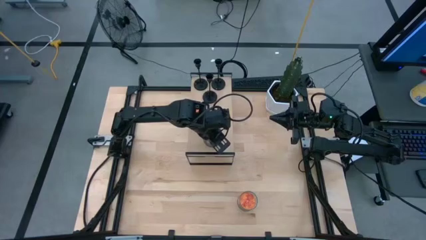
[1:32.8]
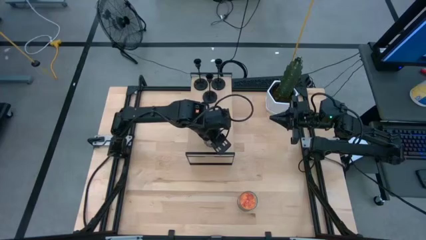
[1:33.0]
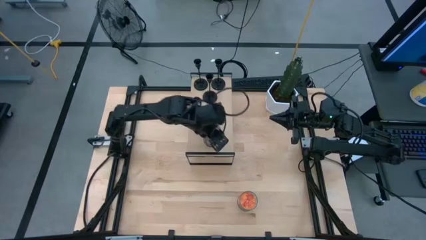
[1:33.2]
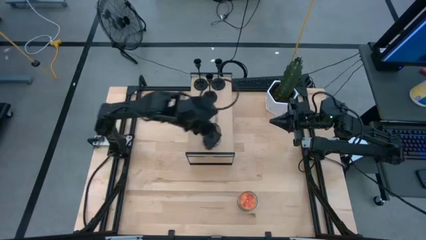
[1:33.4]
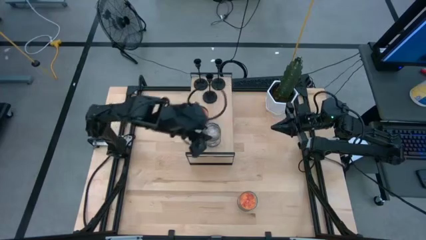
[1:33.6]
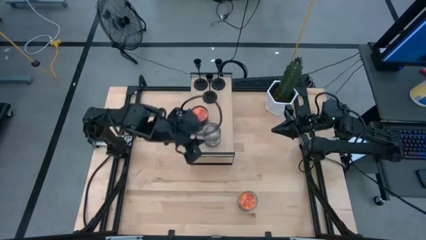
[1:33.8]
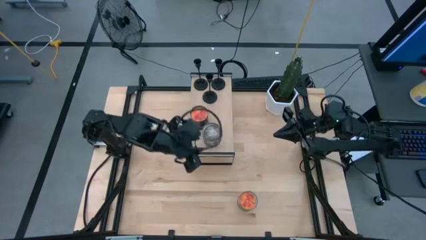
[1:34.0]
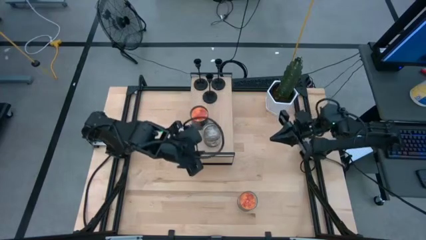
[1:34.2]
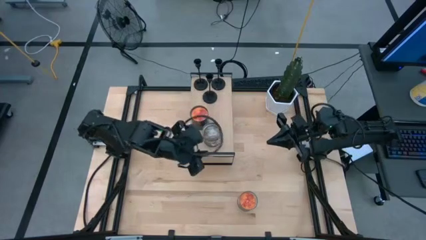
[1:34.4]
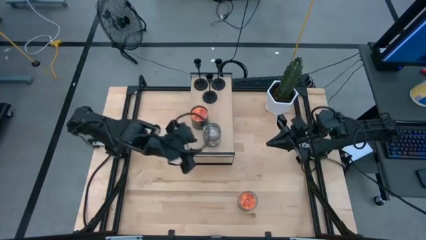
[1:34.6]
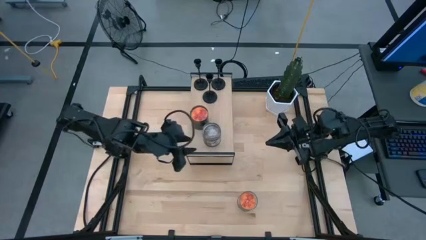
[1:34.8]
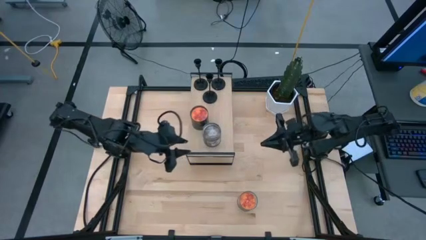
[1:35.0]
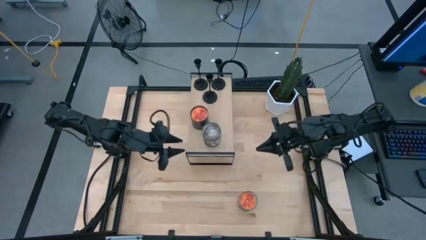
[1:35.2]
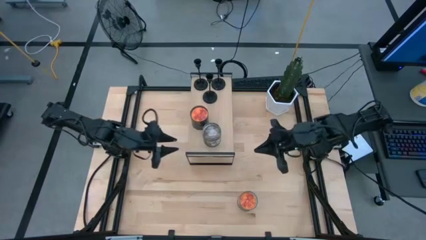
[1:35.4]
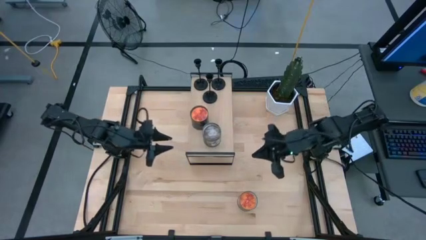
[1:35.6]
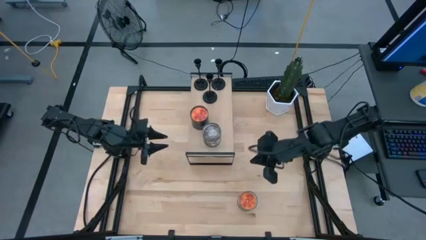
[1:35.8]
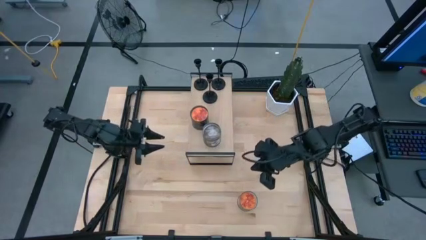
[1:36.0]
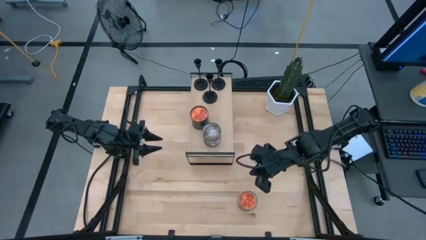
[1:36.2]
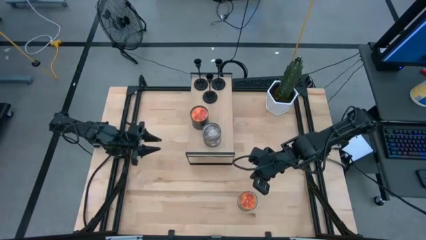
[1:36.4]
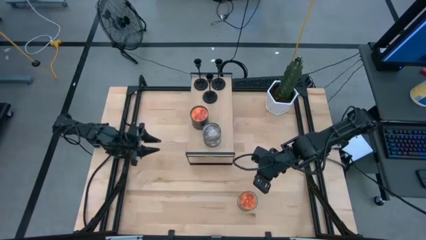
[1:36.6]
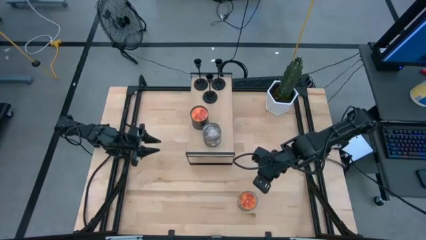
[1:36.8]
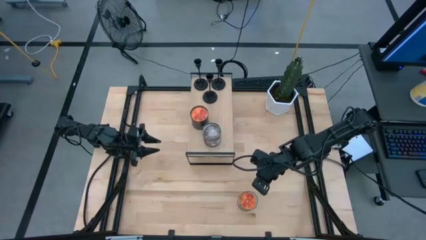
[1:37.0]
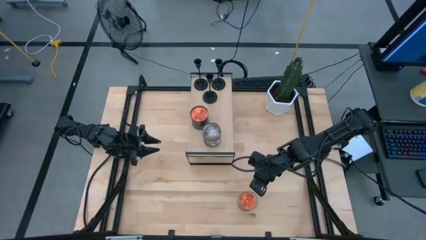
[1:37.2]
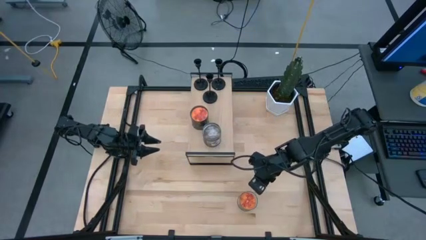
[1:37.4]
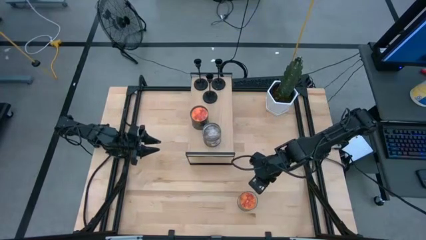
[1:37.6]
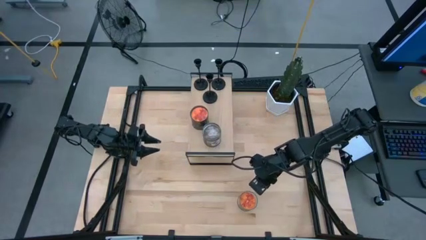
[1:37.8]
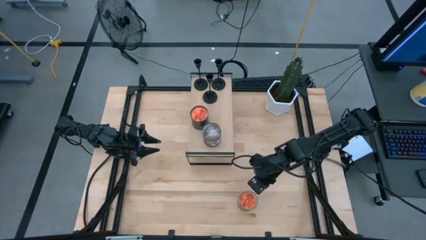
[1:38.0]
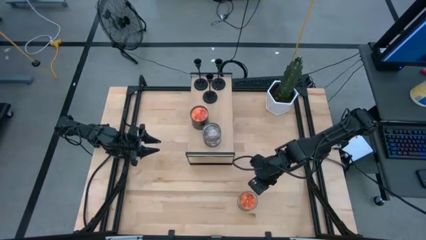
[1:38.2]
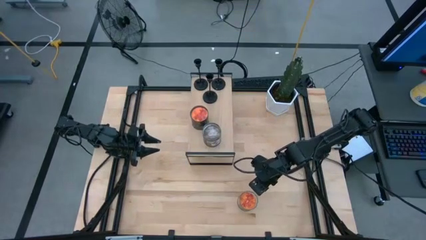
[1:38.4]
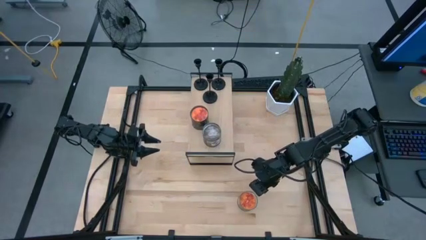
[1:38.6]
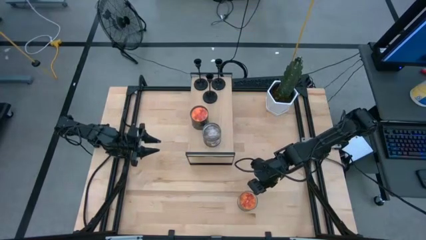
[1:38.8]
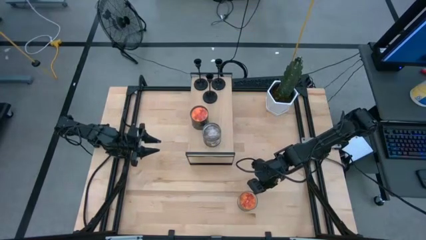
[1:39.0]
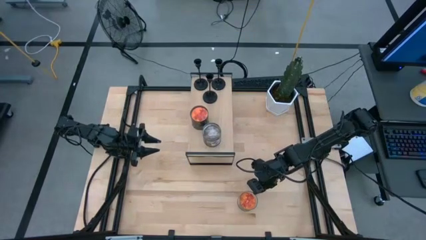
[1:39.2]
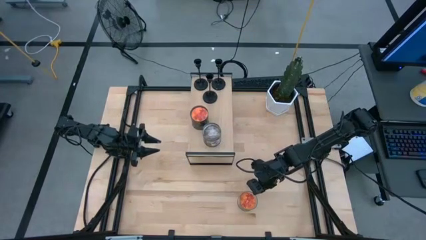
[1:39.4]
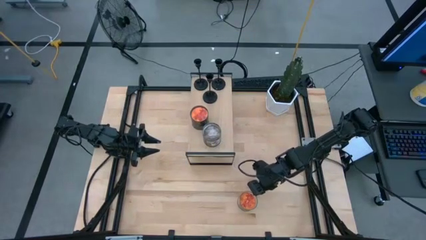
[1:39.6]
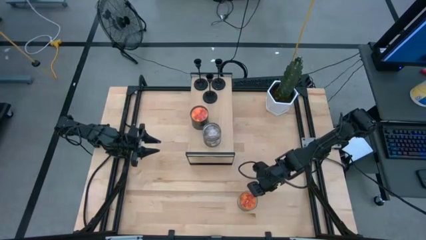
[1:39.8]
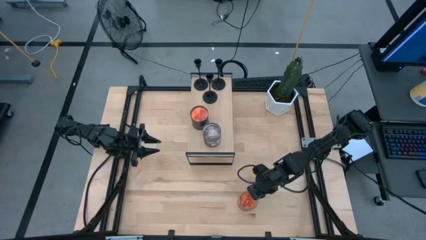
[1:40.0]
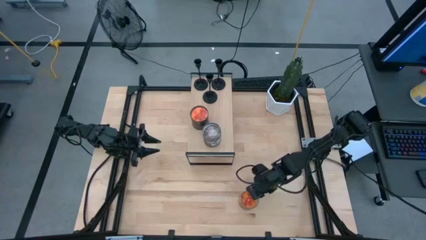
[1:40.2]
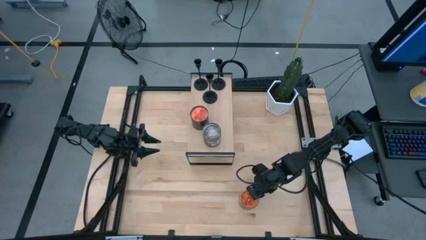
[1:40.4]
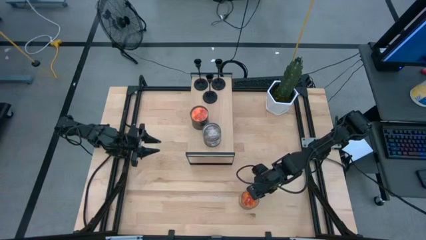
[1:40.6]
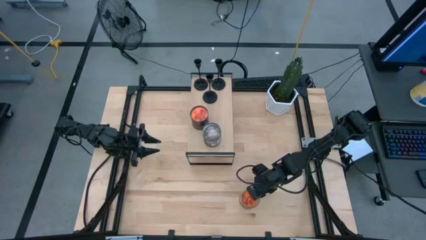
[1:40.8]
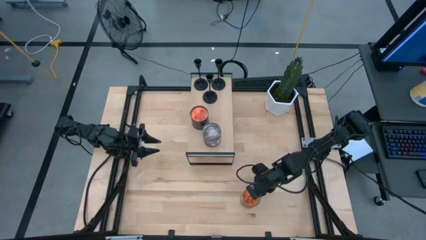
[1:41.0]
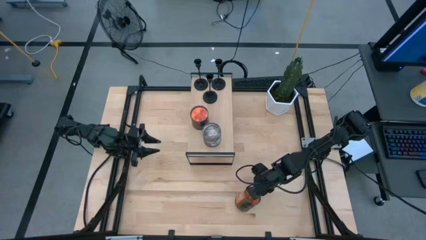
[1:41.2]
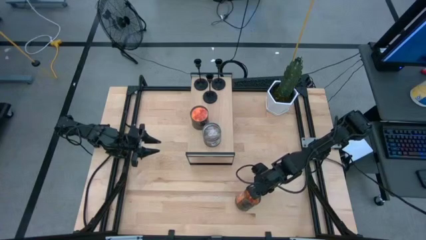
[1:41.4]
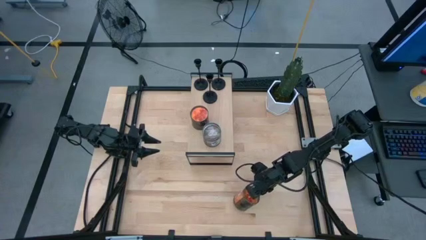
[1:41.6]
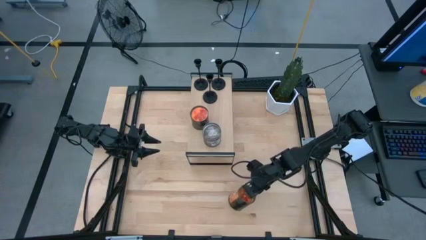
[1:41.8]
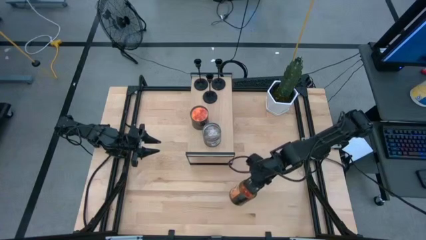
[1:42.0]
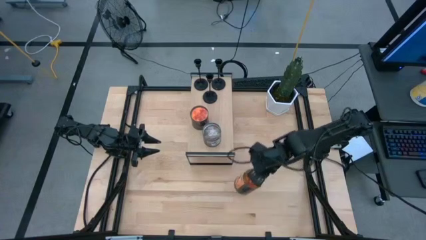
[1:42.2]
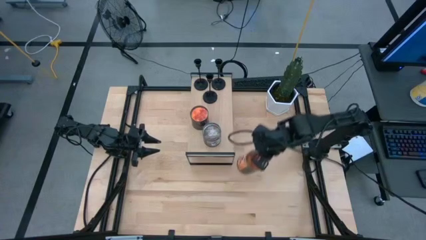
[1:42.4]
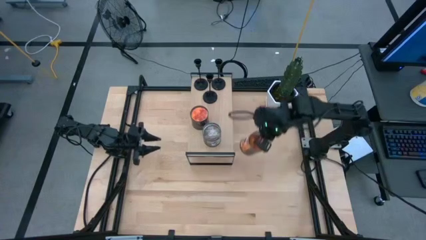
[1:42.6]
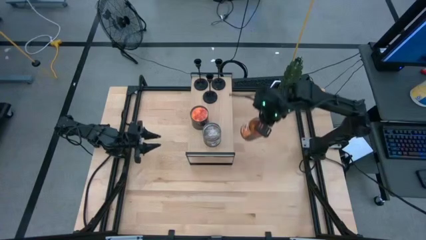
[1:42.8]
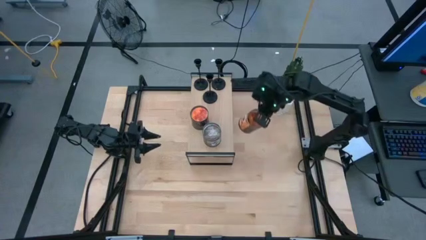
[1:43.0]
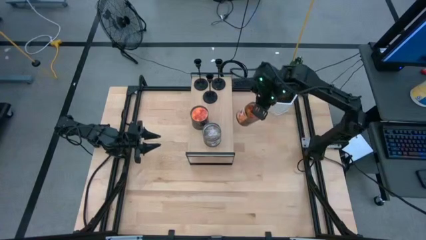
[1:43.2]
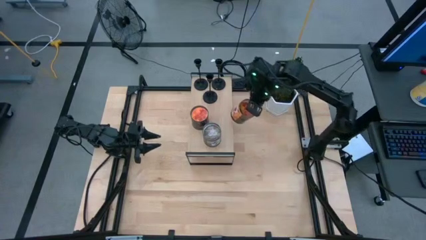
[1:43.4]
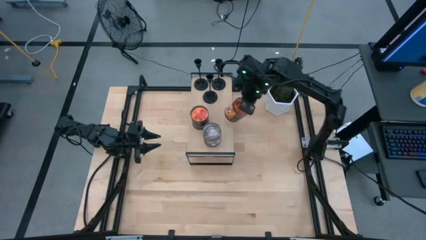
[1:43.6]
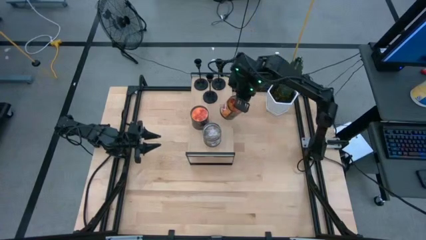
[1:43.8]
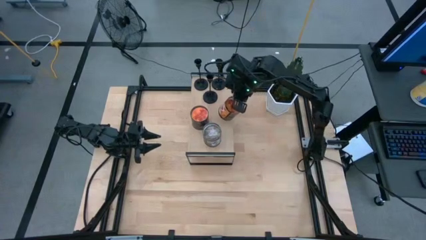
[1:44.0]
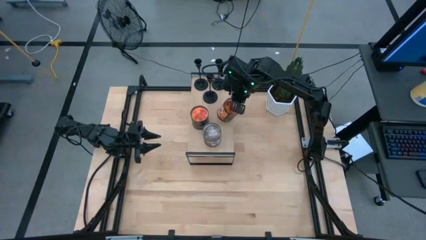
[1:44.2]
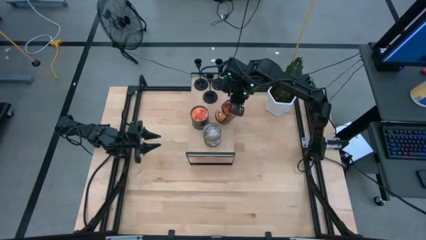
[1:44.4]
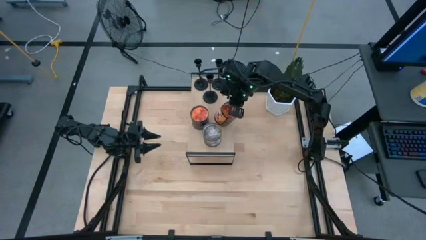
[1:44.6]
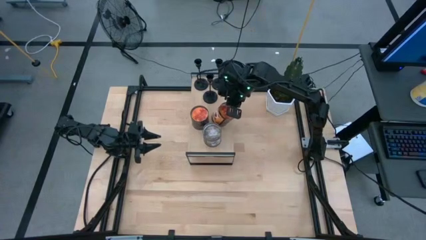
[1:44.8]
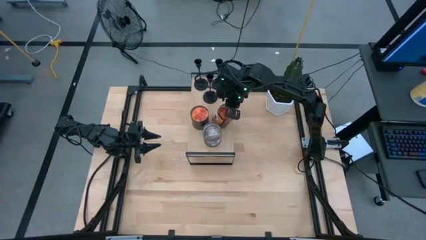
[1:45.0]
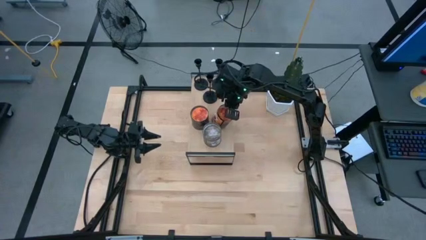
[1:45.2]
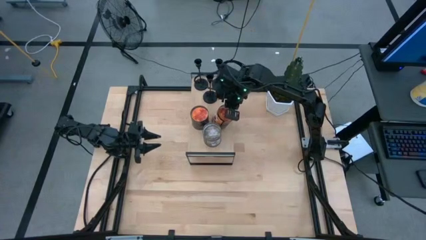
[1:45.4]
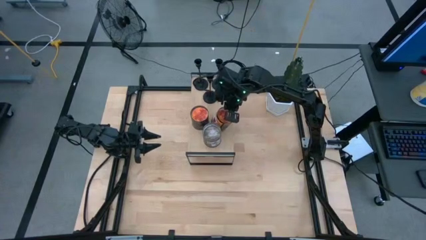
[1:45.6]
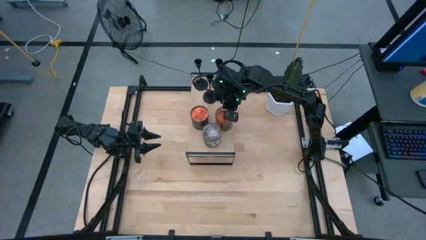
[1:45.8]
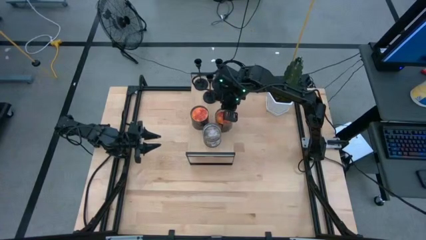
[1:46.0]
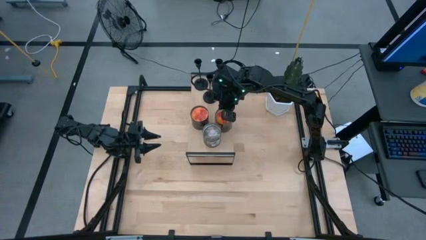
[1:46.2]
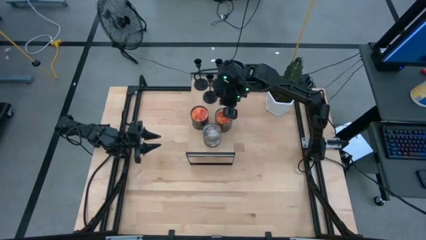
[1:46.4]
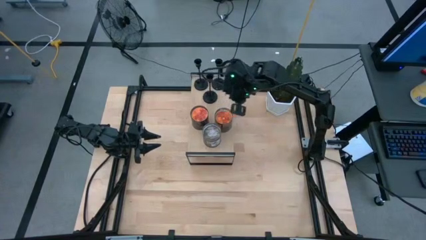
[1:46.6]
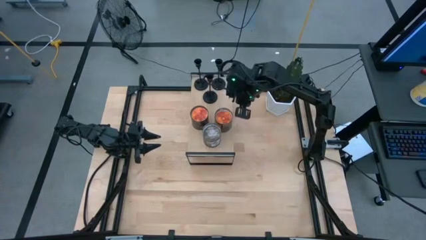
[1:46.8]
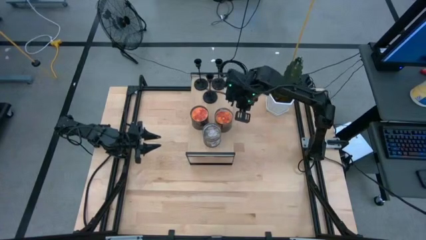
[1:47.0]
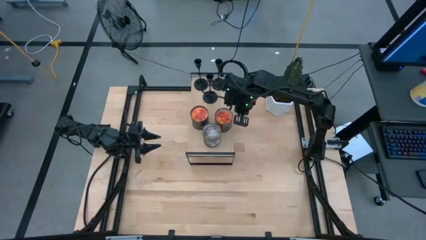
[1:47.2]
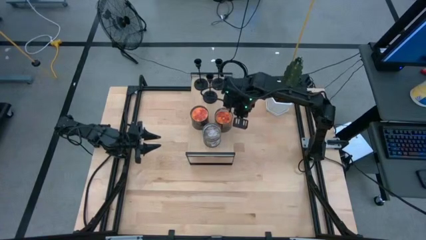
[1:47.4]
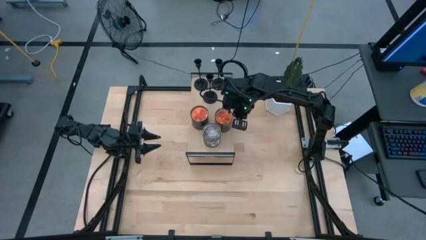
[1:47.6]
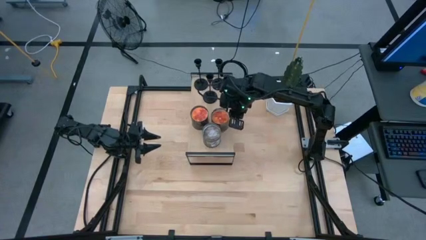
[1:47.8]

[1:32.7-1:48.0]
Task: Pick & Place candle stick holders
Put the orange scented candle on the shelf

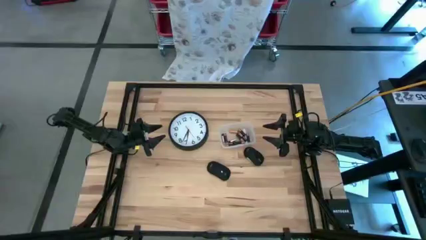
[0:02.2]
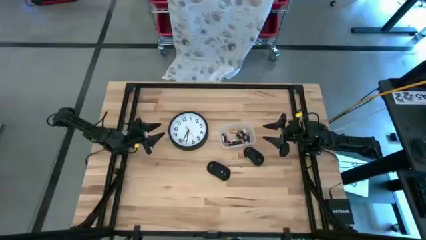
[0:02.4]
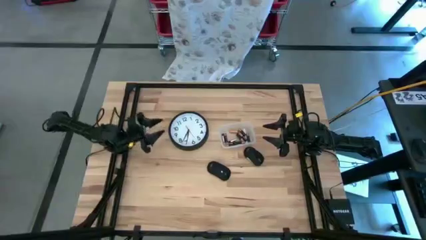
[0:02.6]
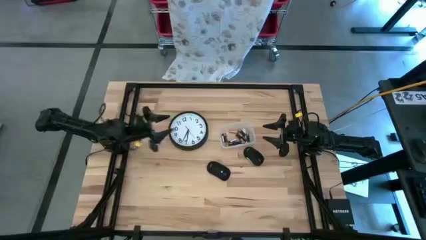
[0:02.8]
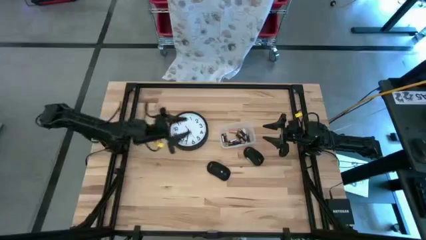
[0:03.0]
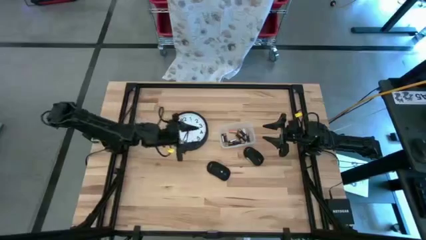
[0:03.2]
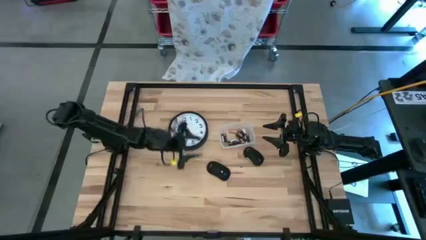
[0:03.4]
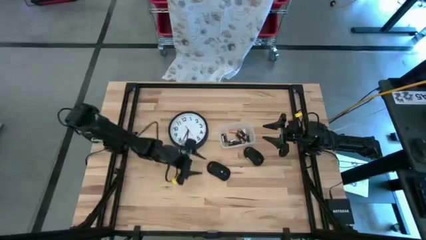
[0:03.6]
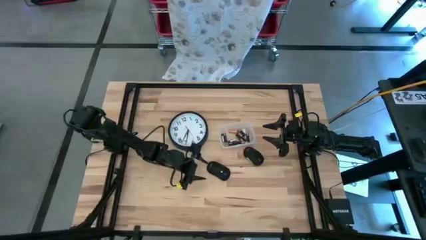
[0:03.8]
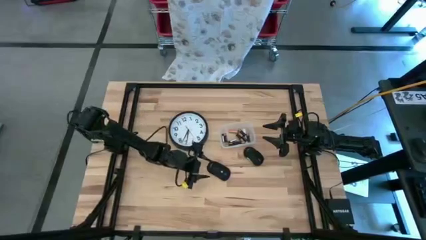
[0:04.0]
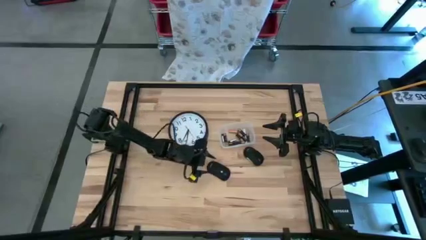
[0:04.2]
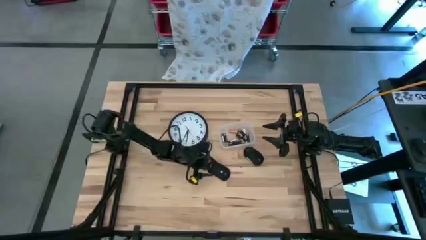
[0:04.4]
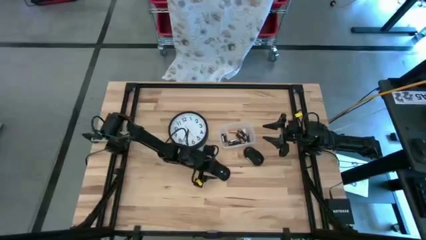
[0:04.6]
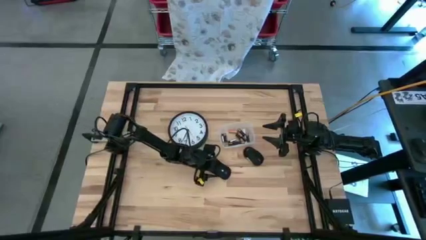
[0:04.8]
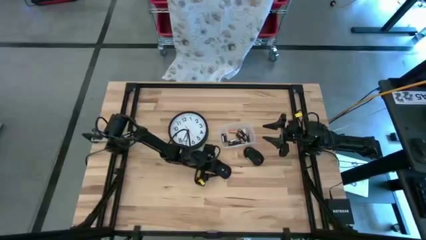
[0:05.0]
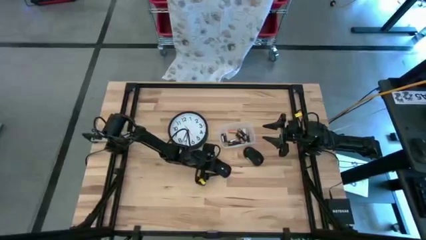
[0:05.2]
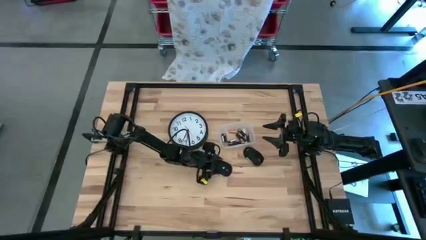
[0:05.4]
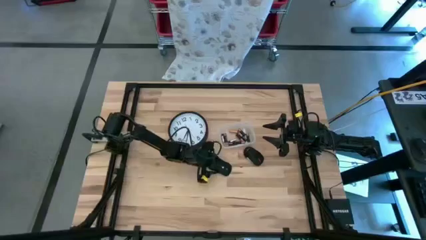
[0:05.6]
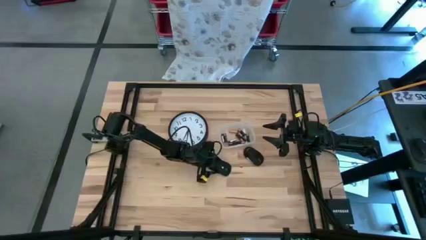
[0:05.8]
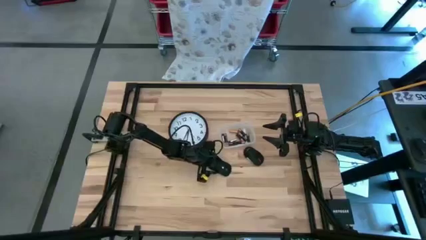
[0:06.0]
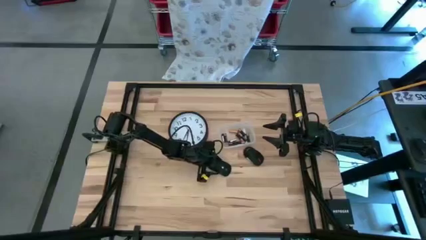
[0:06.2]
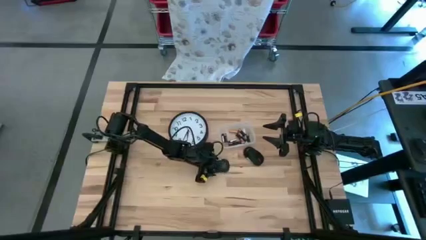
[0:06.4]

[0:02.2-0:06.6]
Task: Insert battery
Prepare the left computer mouse for the battery insertion
